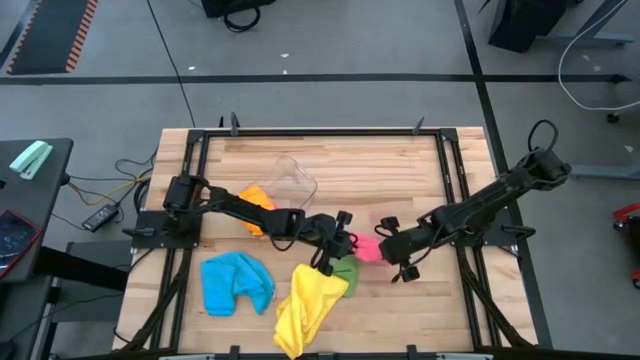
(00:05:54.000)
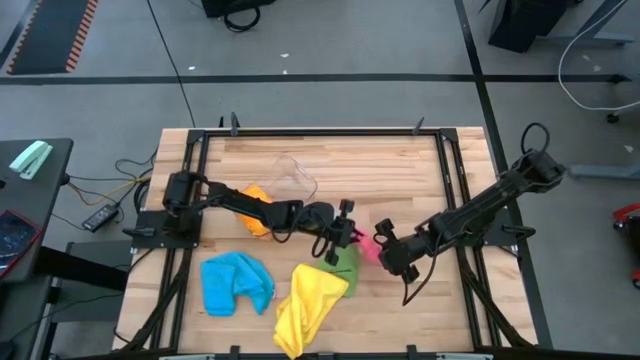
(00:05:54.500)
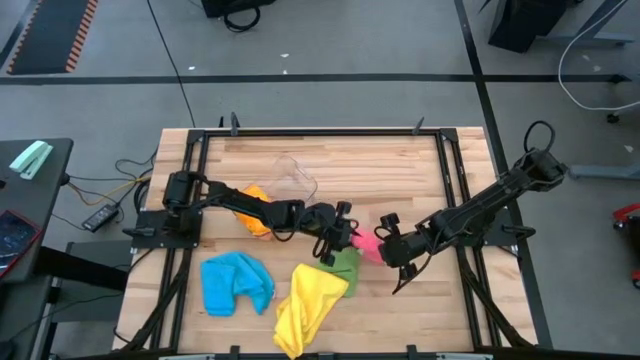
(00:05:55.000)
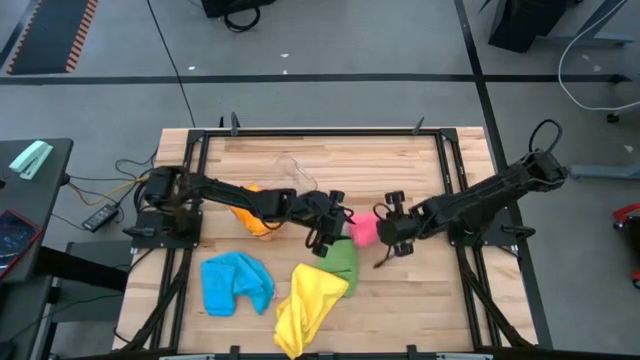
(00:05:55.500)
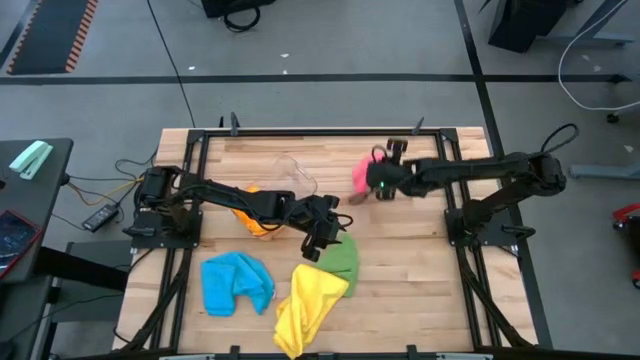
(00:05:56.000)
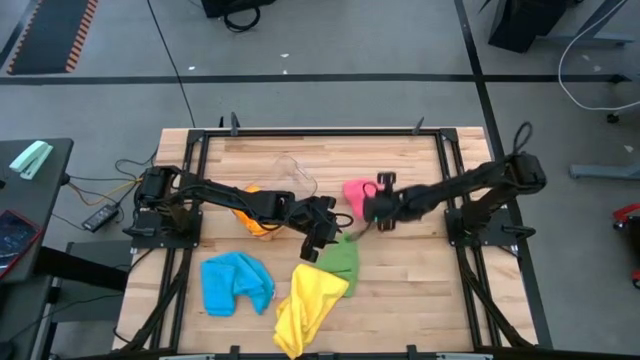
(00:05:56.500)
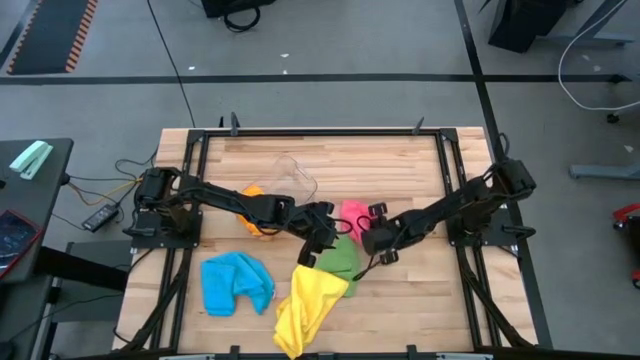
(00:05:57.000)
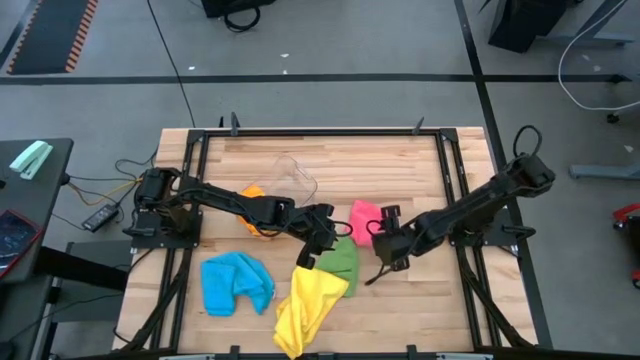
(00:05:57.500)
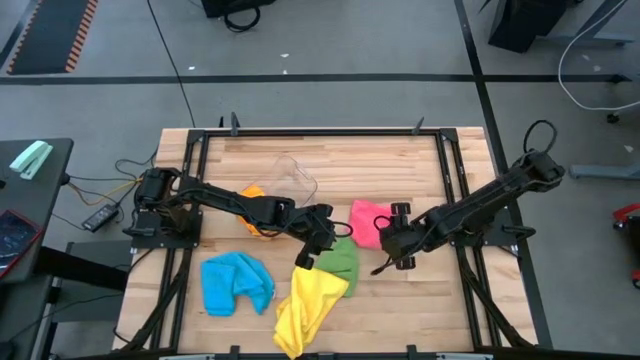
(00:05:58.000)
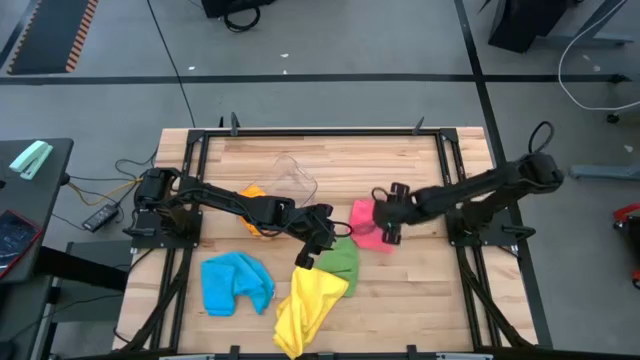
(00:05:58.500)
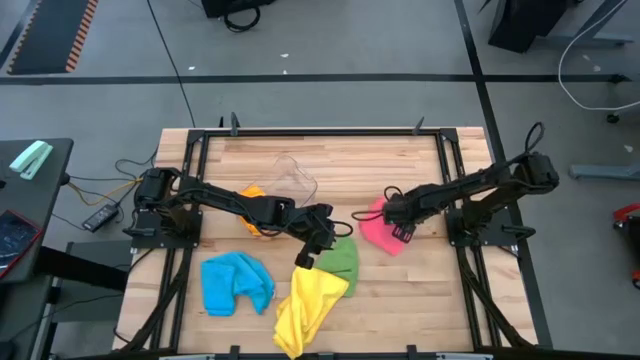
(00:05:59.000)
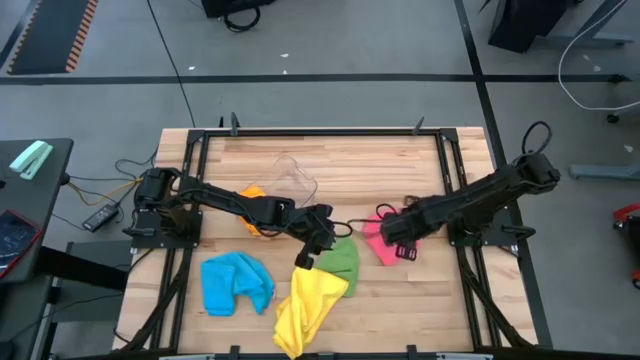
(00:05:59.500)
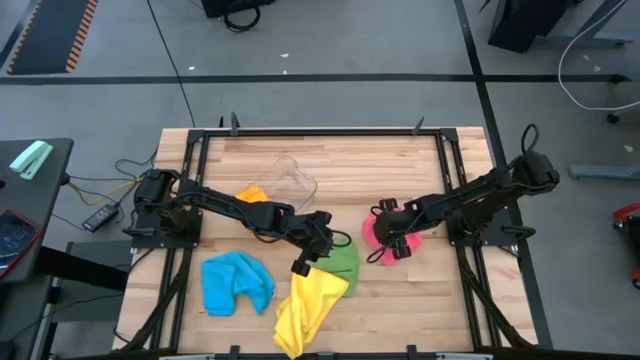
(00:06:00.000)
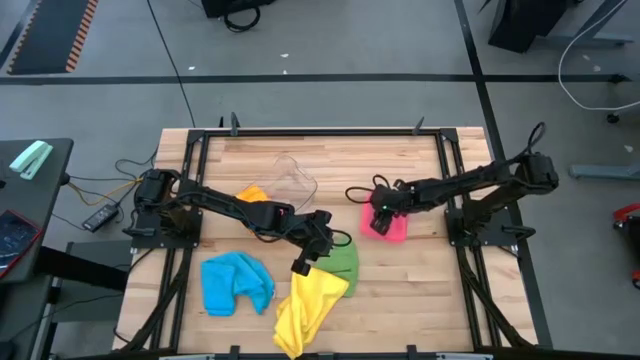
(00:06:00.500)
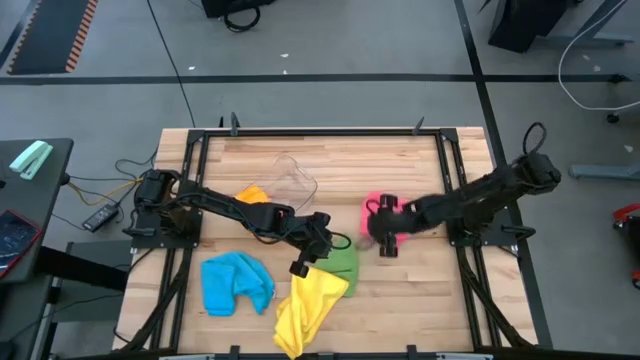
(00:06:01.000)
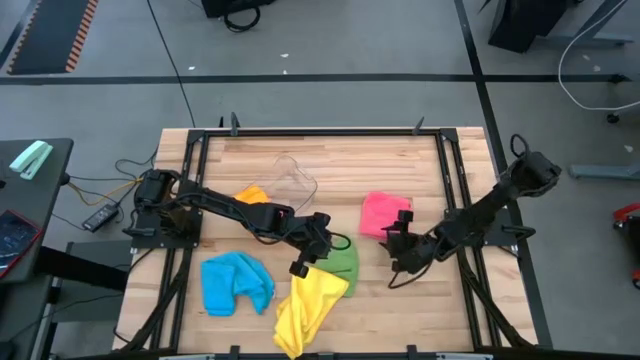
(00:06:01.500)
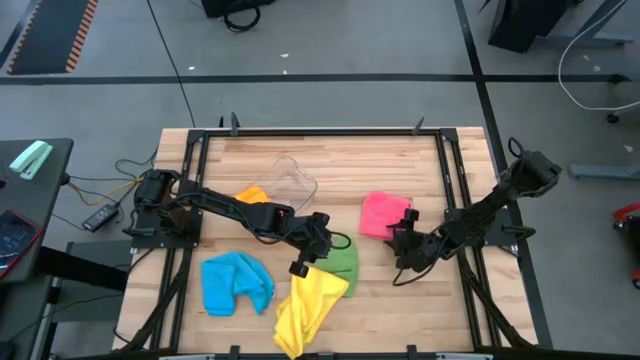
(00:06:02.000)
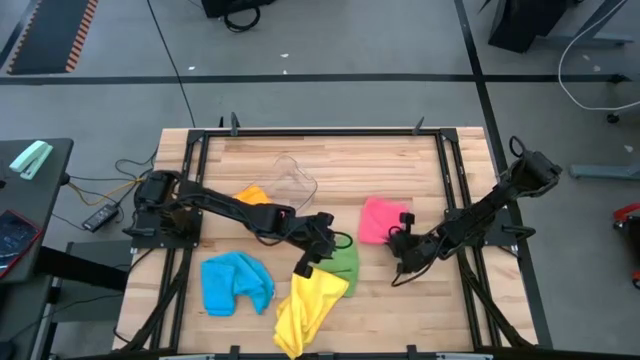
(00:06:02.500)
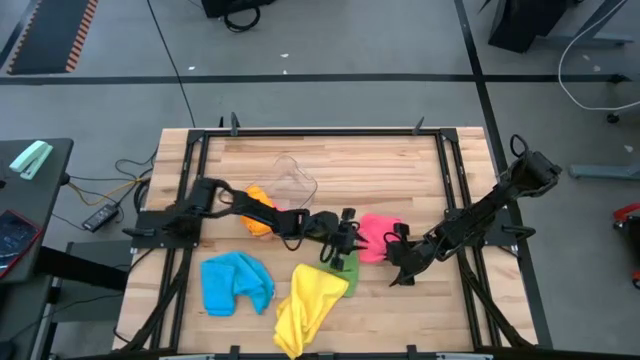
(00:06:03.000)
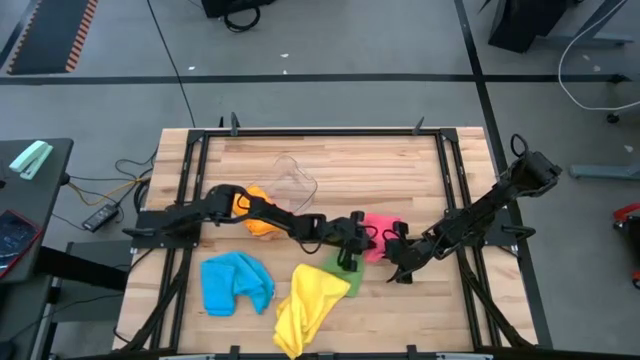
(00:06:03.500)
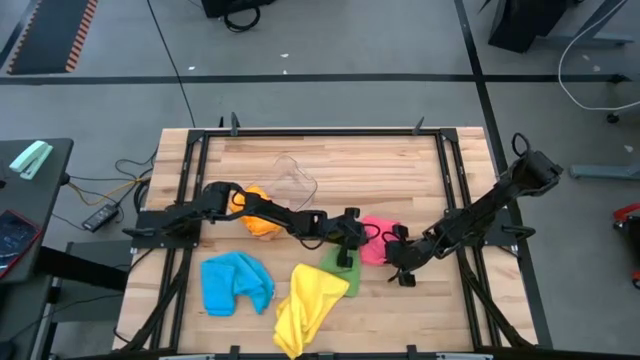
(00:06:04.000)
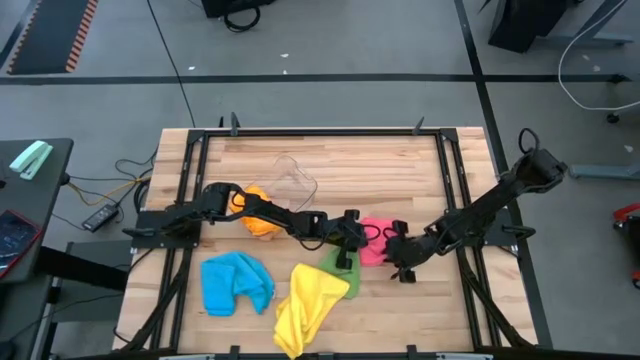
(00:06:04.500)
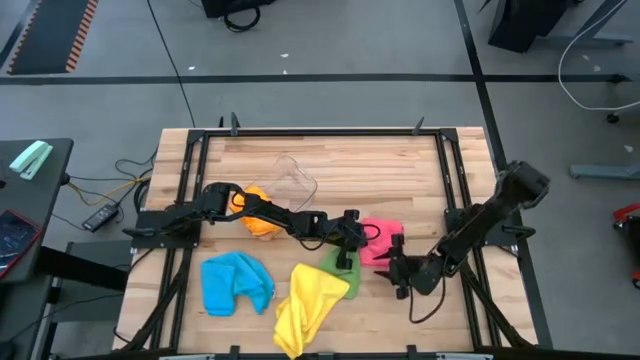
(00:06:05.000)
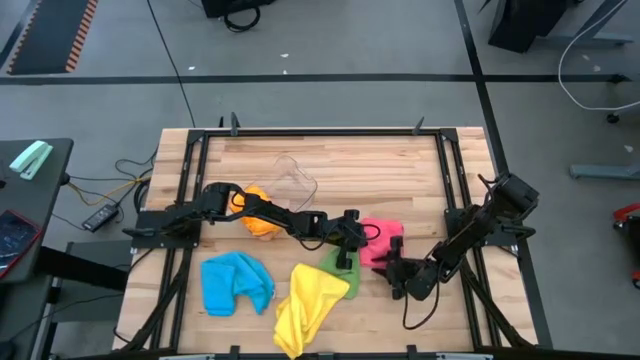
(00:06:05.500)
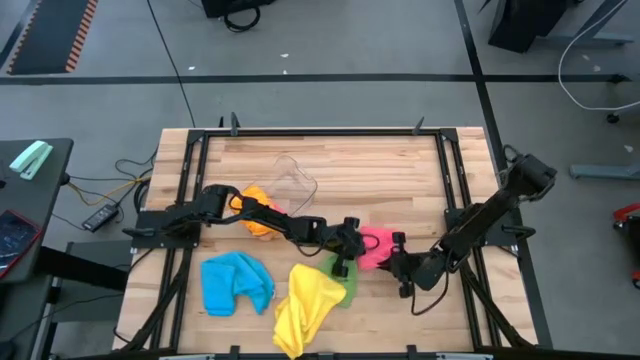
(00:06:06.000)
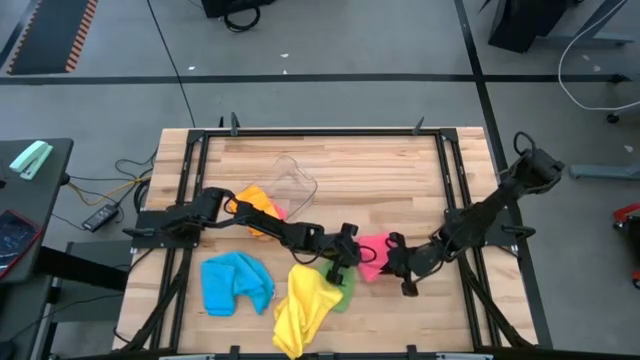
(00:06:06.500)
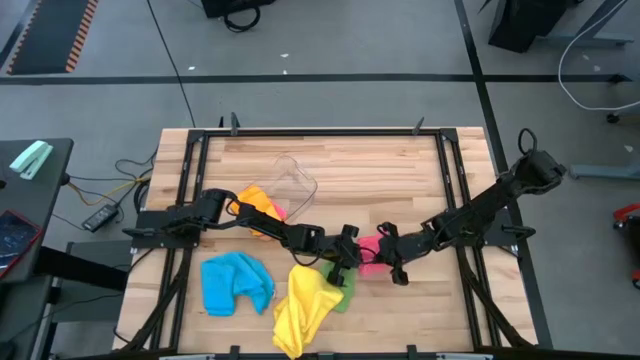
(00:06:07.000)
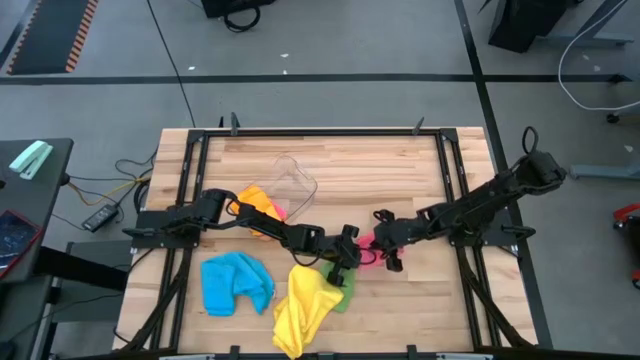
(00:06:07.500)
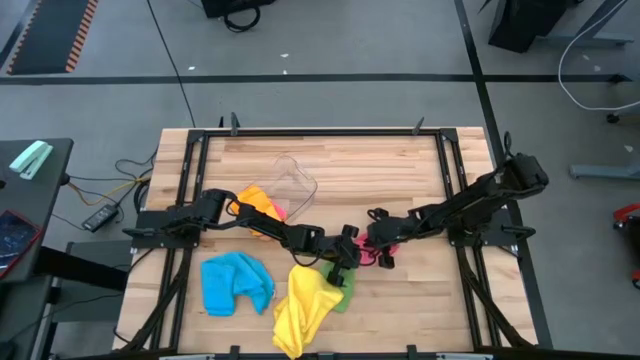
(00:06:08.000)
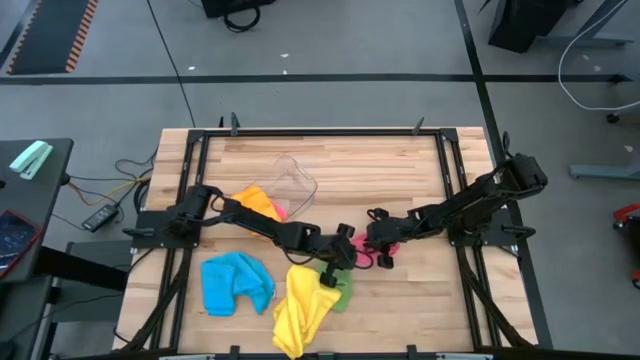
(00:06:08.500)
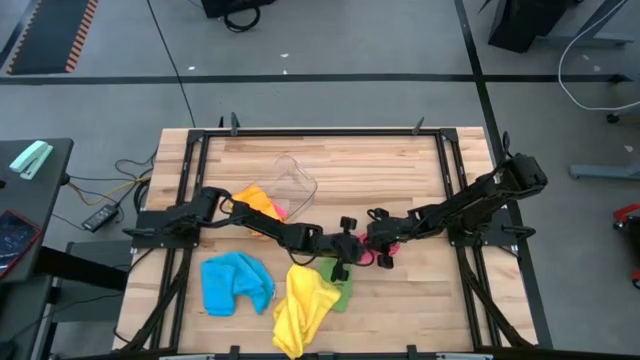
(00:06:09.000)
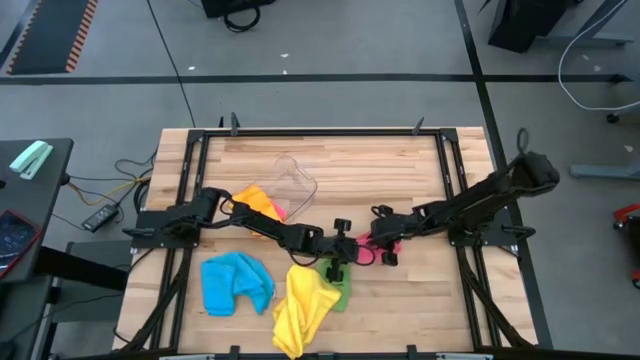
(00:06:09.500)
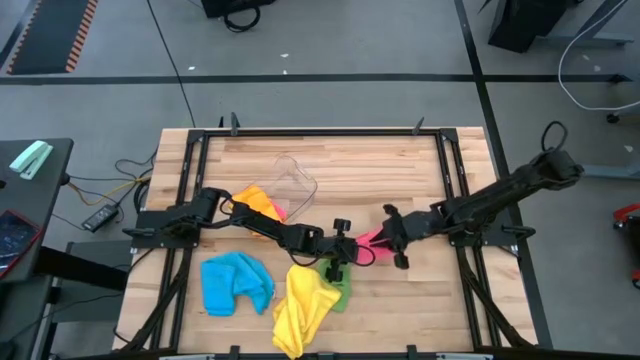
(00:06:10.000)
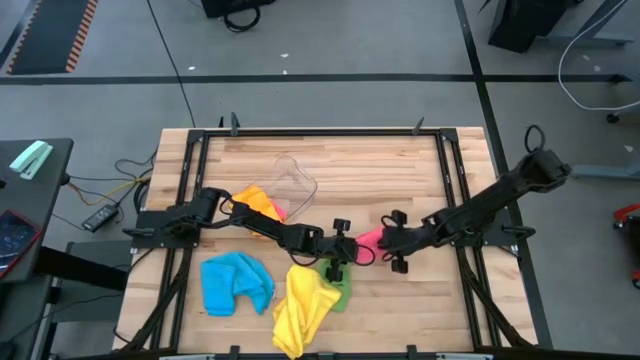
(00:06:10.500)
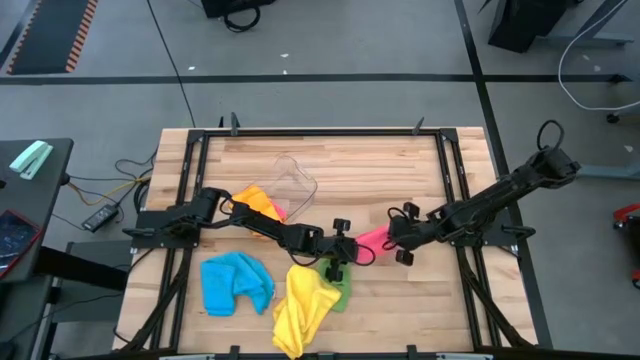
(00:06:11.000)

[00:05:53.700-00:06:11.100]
Task: Fold microfiber towels
Fold the pink microfiber towel
